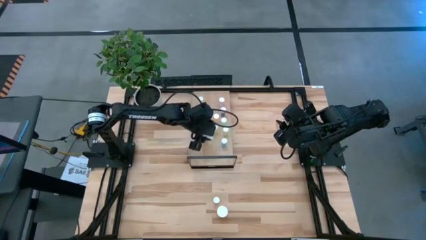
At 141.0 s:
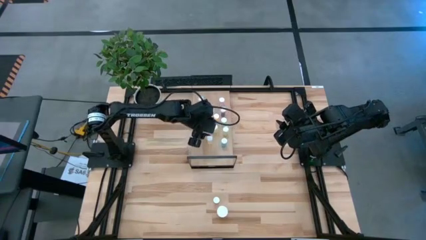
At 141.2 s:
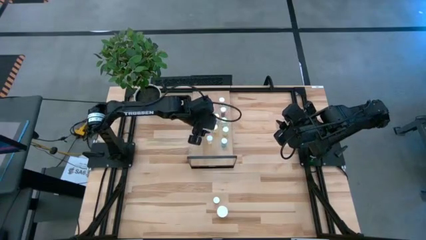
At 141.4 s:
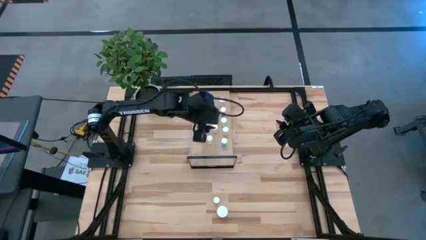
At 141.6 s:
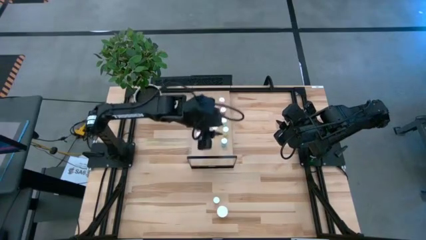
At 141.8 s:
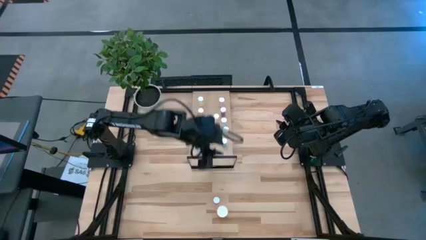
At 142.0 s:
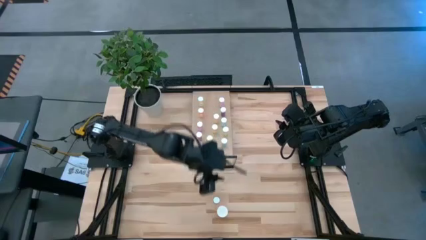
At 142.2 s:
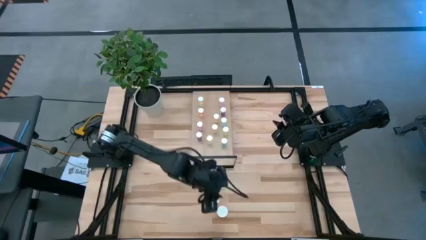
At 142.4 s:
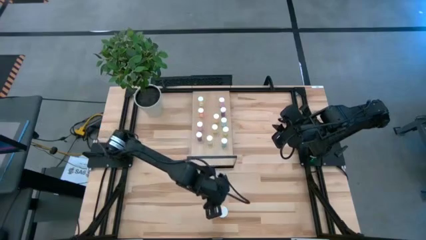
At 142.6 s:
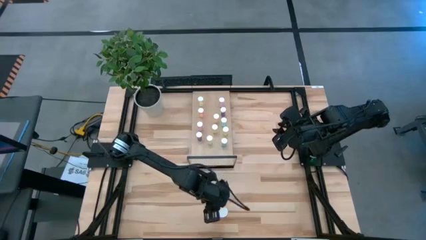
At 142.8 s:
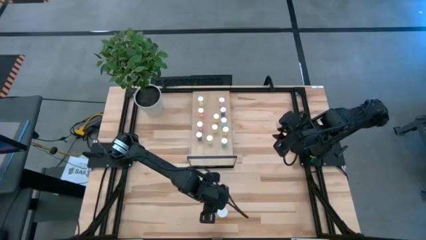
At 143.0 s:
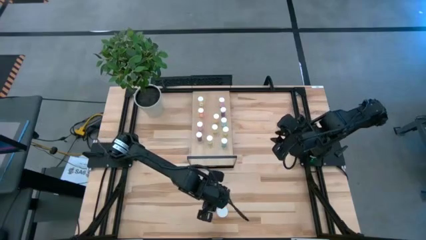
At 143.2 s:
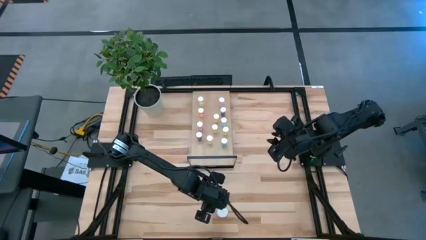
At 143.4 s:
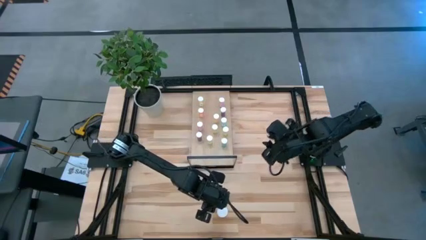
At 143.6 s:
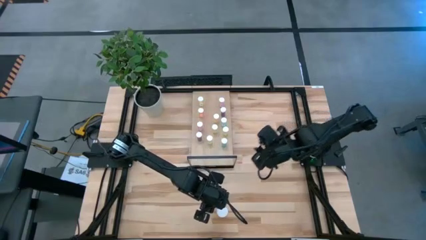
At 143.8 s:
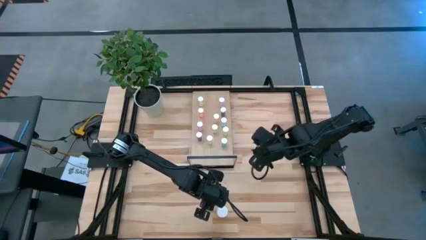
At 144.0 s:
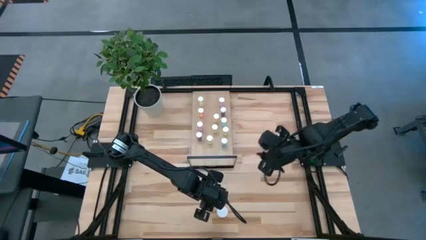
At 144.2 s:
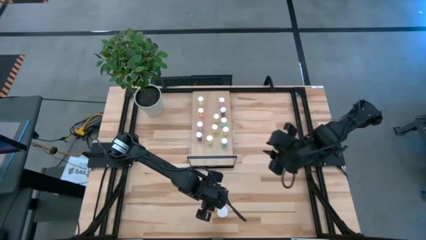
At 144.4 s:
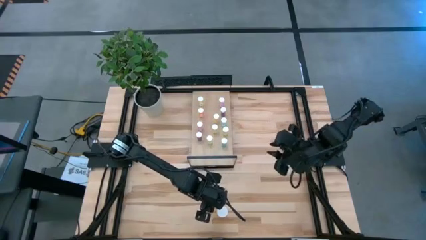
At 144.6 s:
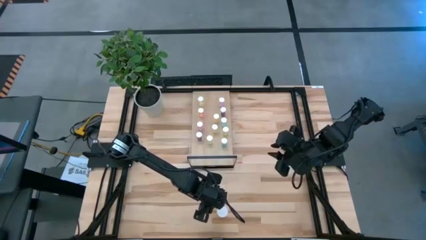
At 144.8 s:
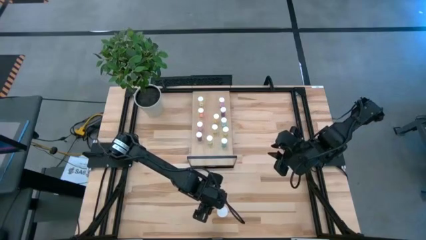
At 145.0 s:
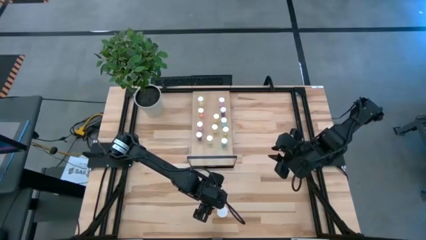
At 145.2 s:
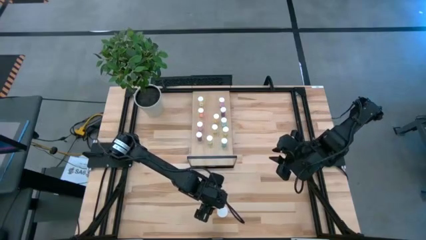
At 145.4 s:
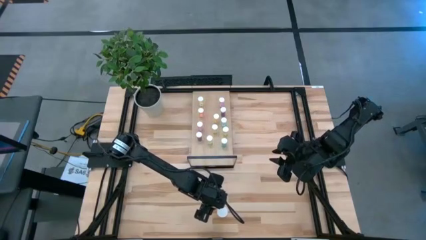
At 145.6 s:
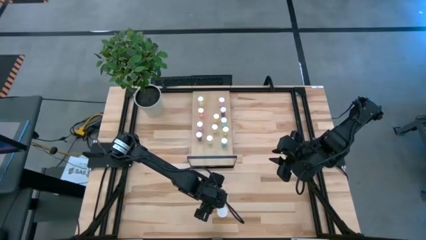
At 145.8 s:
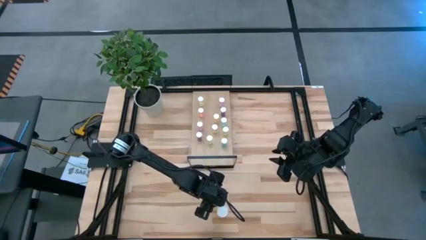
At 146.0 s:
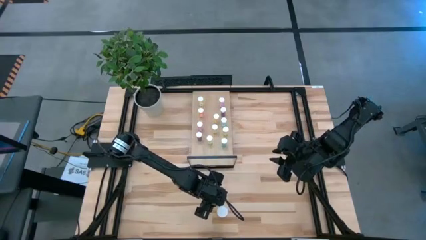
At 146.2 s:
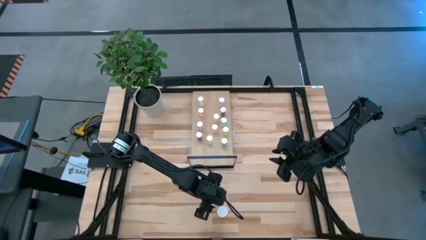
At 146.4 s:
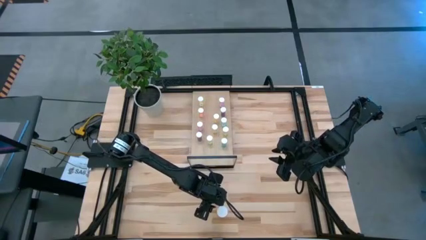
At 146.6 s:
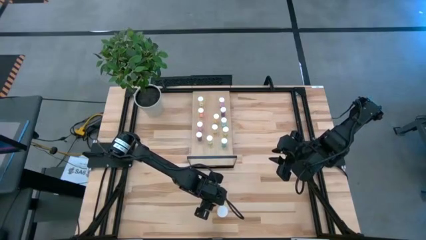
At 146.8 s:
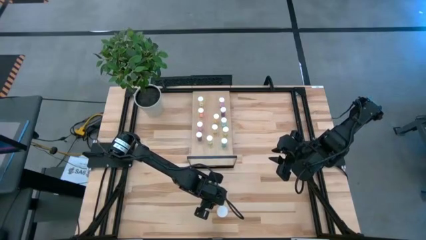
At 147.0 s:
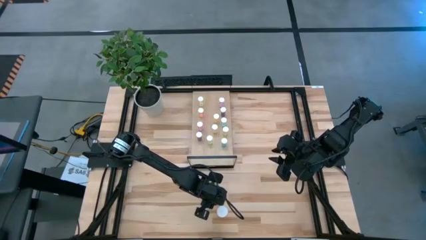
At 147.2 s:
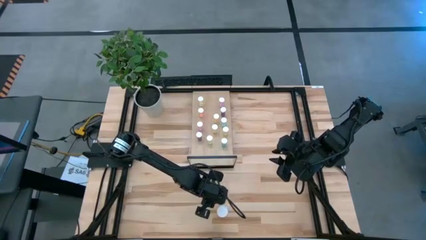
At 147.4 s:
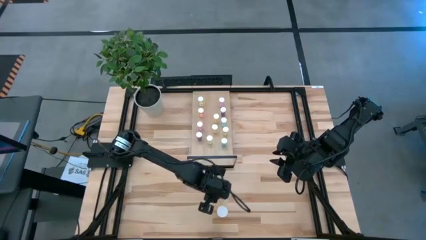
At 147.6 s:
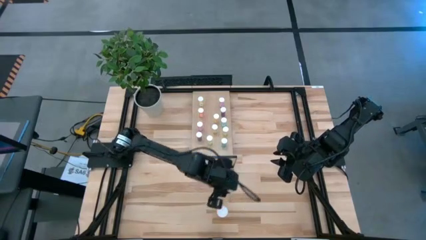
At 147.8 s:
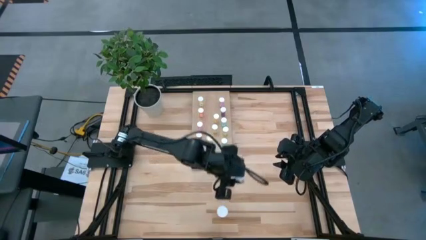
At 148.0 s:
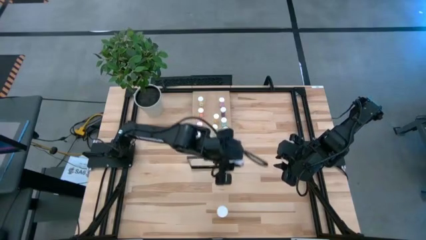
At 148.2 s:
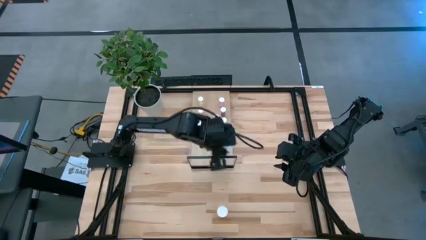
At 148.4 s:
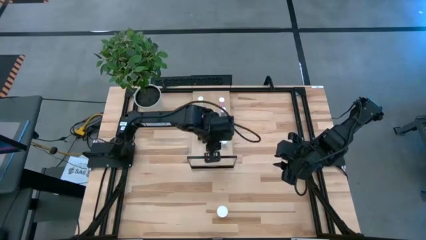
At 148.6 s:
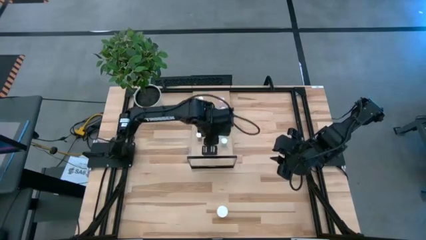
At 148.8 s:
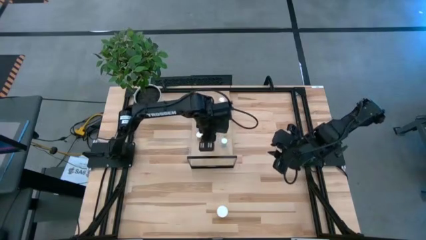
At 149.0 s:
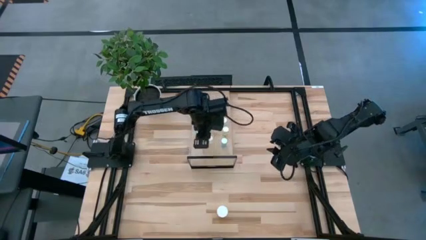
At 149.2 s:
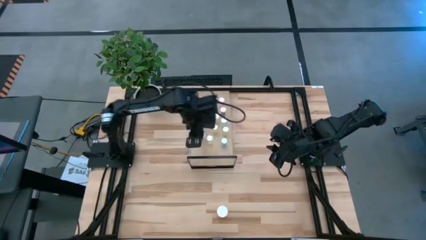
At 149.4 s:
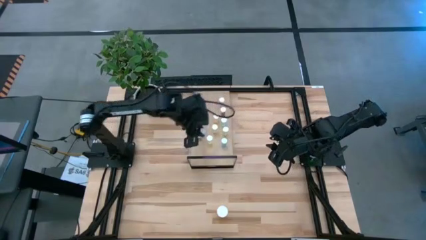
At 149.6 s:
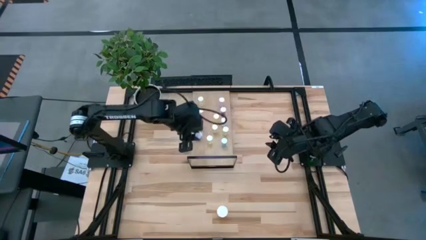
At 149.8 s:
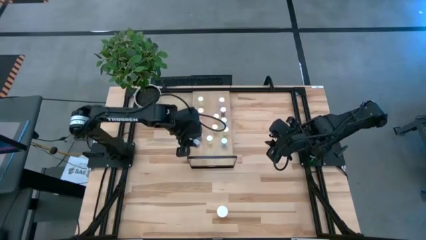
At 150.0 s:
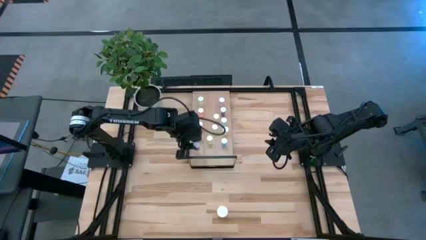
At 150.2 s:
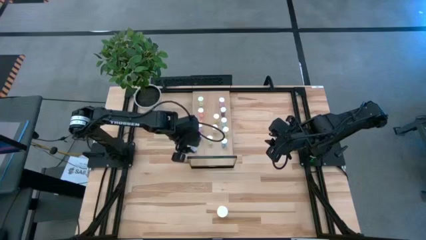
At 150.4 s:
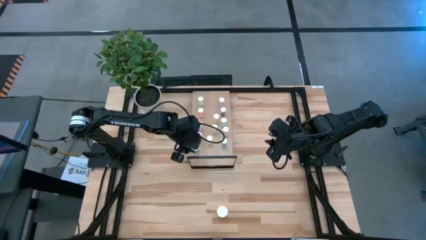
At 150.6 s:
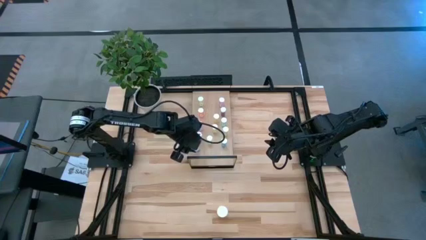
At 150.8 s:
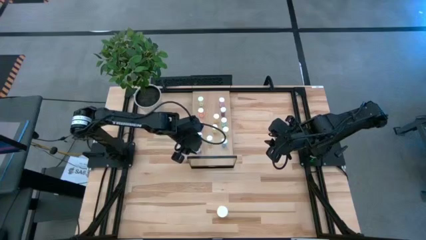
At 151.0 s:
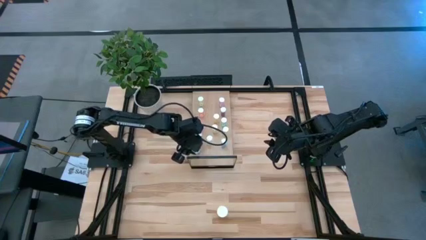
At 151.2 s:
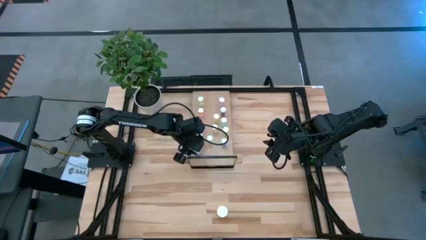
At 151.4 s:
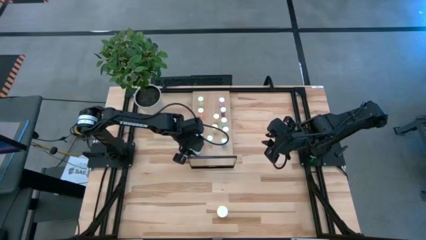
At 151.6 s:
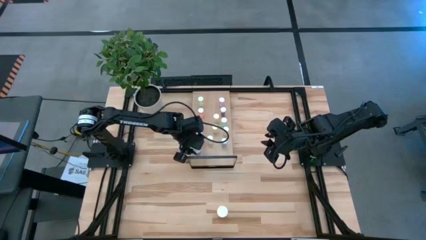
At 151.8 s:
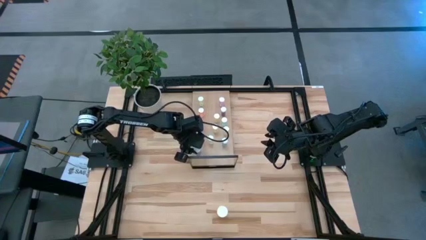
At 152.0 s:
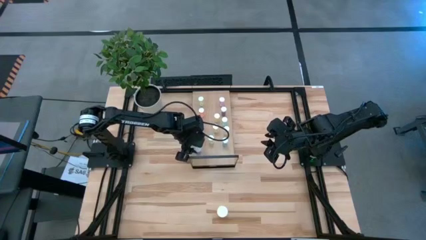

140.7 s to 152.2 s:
Task: Pick and place medicine bottles onto shelf by color
Put the blue pill bottle on the shelf
